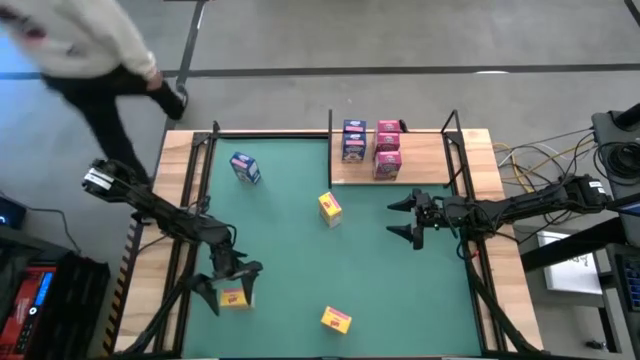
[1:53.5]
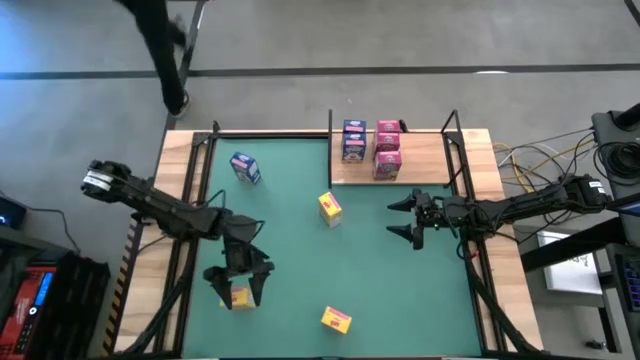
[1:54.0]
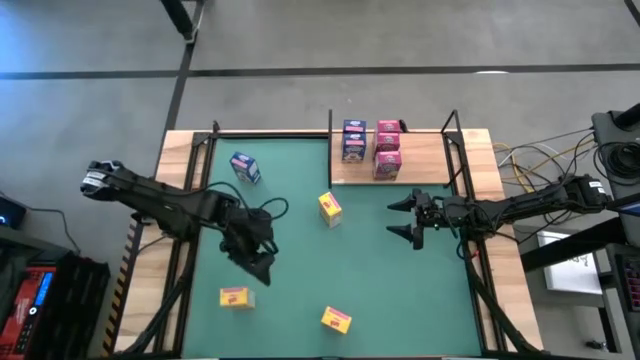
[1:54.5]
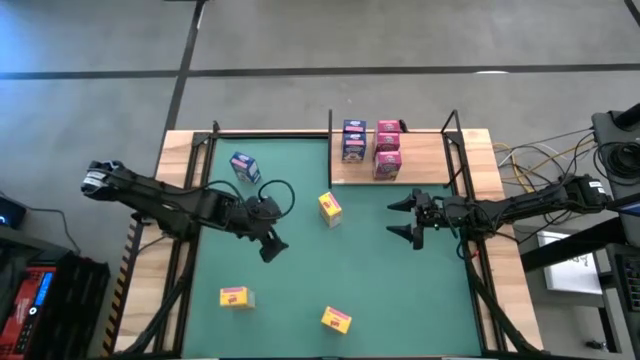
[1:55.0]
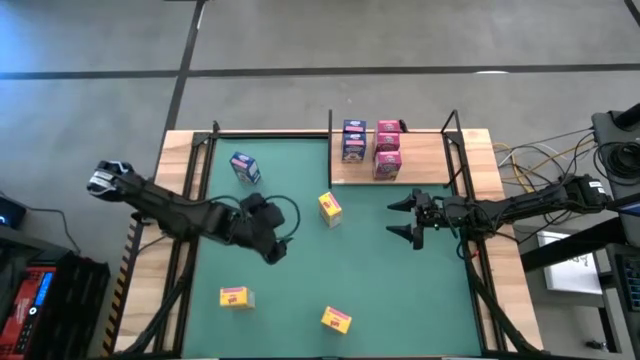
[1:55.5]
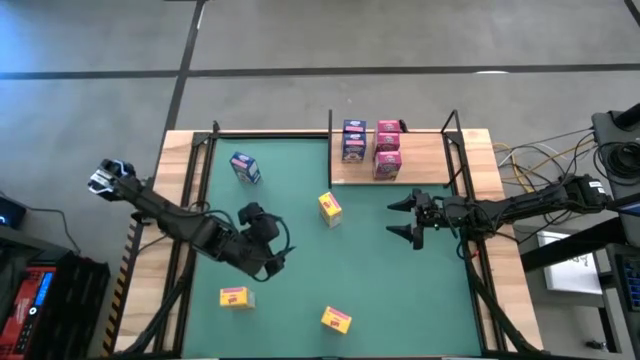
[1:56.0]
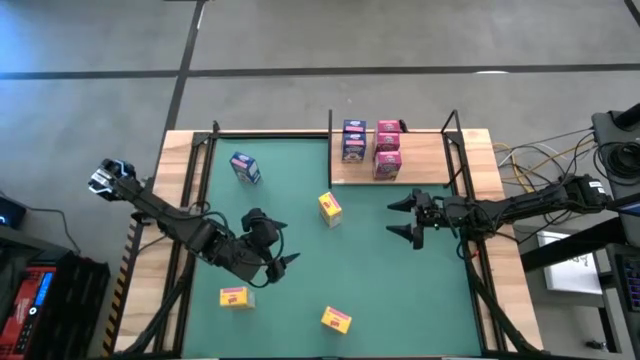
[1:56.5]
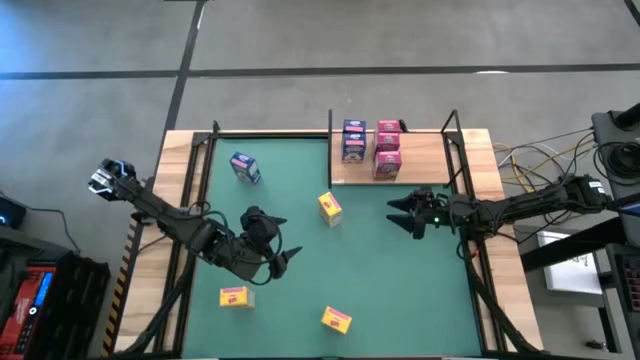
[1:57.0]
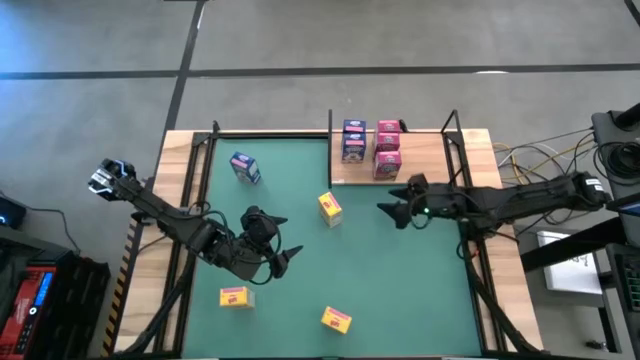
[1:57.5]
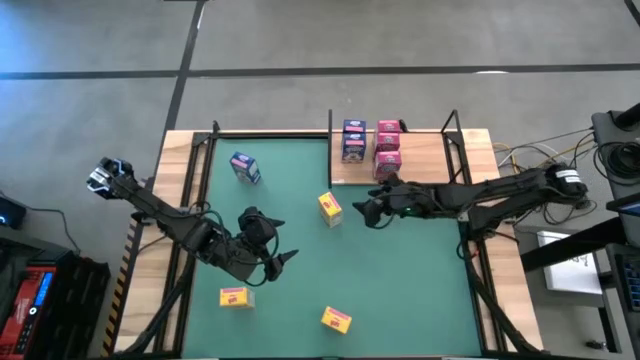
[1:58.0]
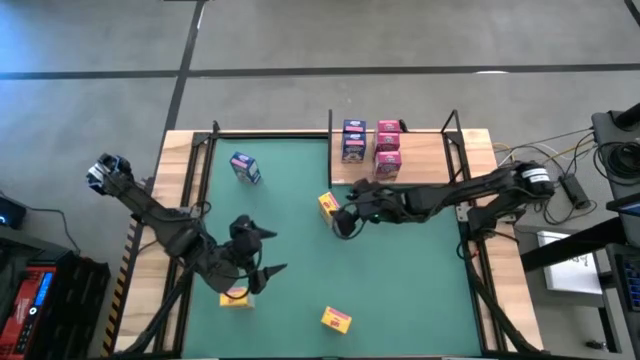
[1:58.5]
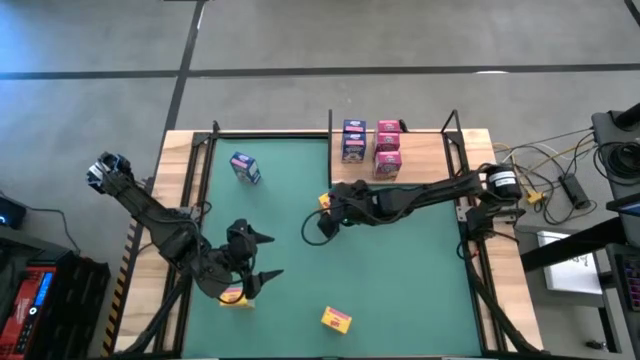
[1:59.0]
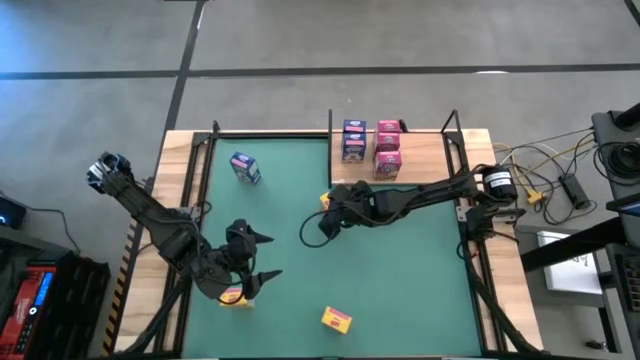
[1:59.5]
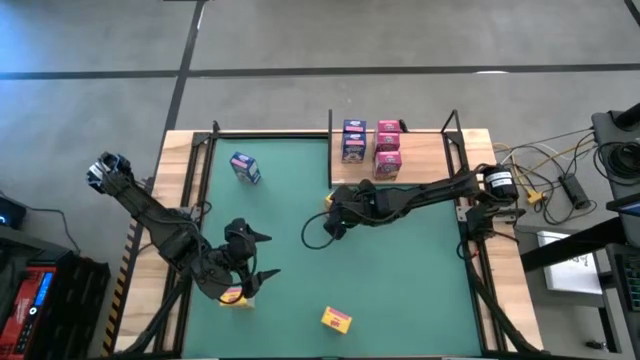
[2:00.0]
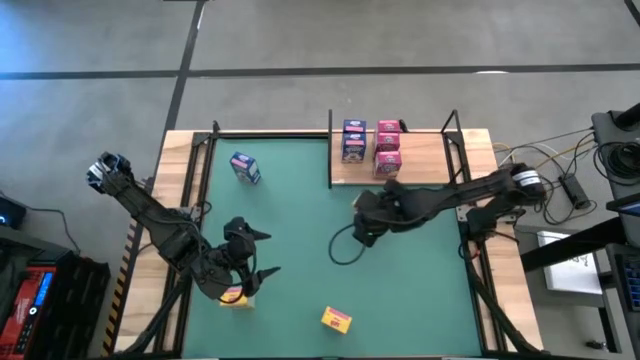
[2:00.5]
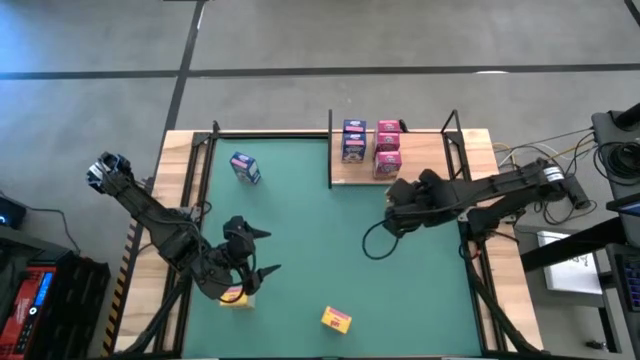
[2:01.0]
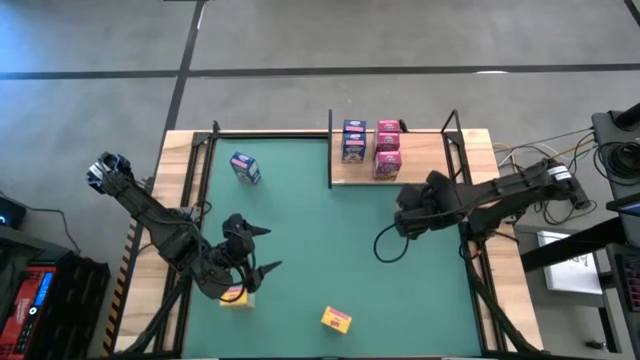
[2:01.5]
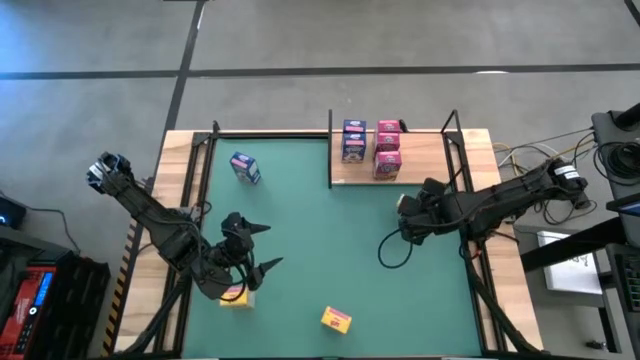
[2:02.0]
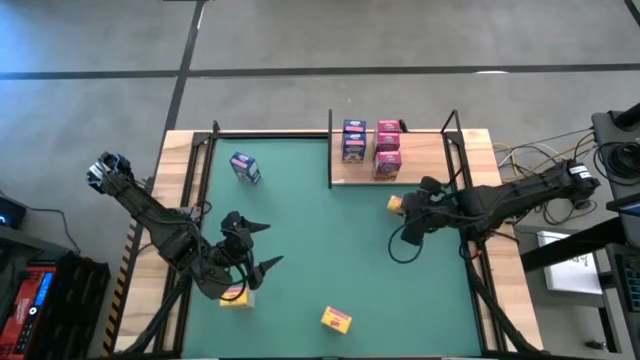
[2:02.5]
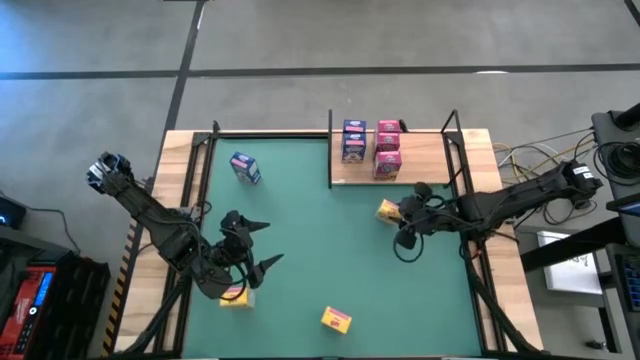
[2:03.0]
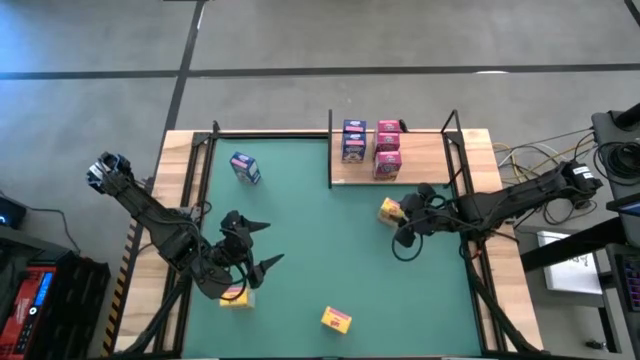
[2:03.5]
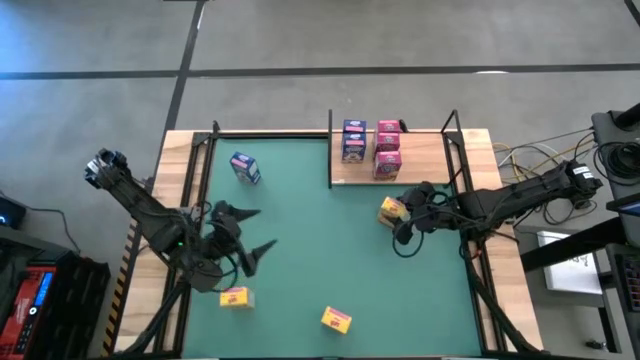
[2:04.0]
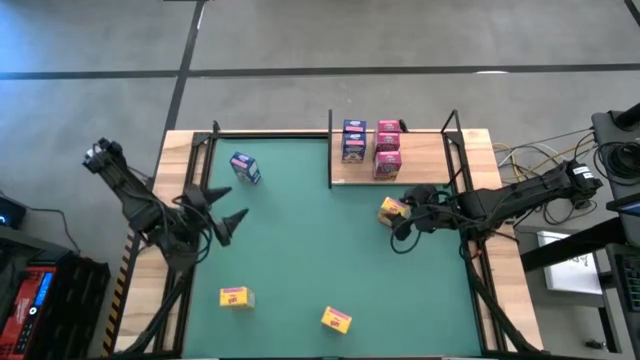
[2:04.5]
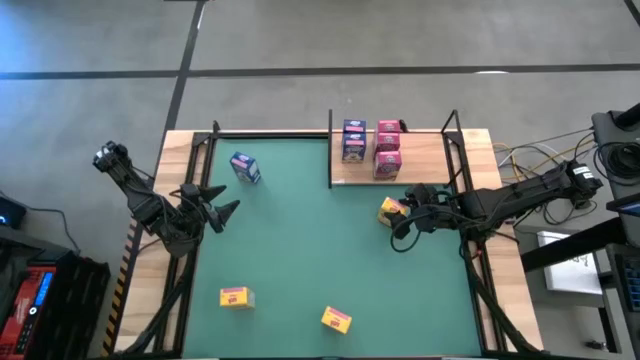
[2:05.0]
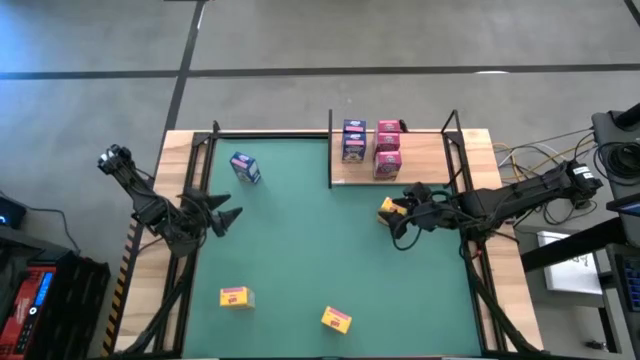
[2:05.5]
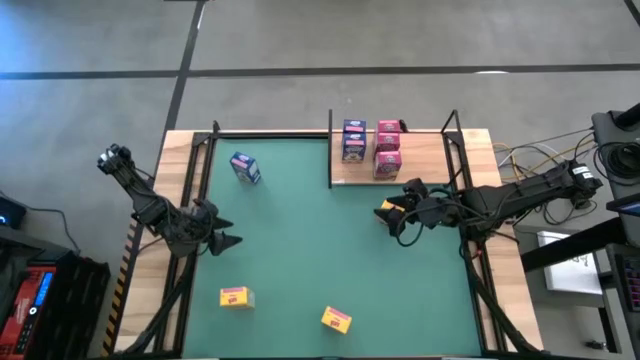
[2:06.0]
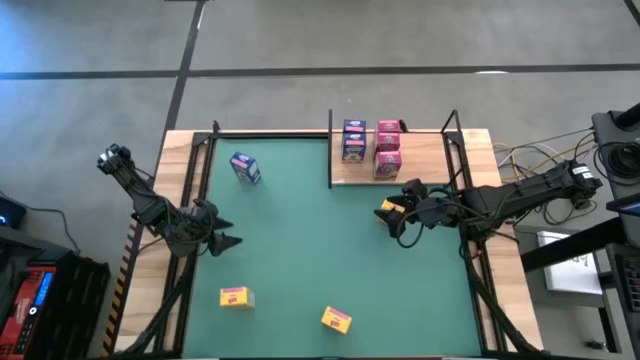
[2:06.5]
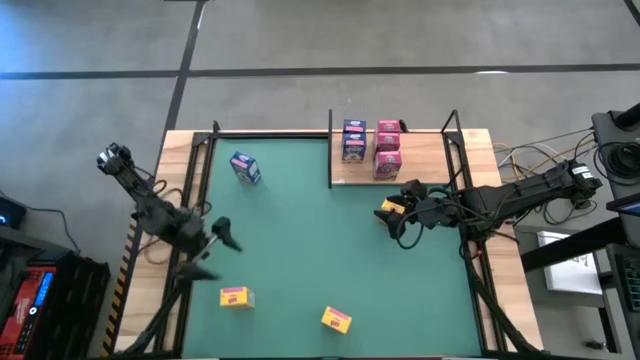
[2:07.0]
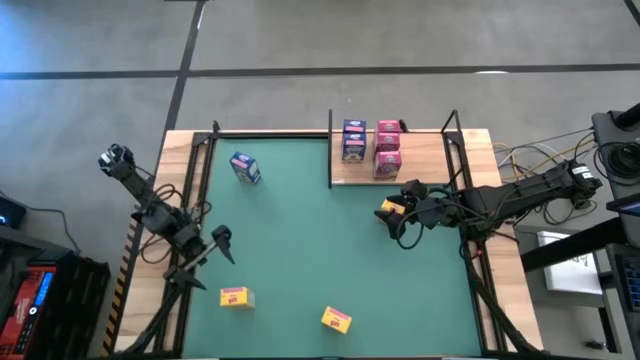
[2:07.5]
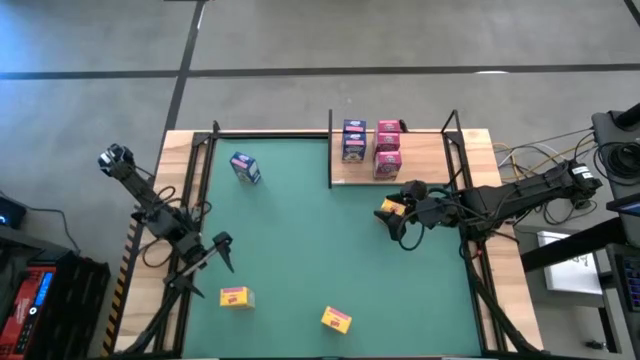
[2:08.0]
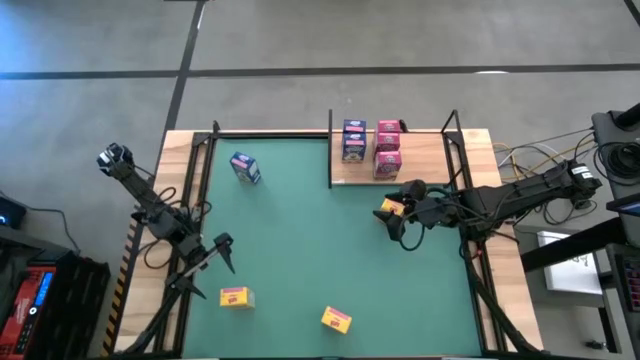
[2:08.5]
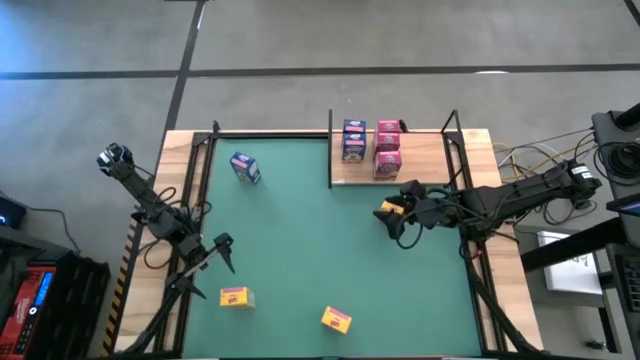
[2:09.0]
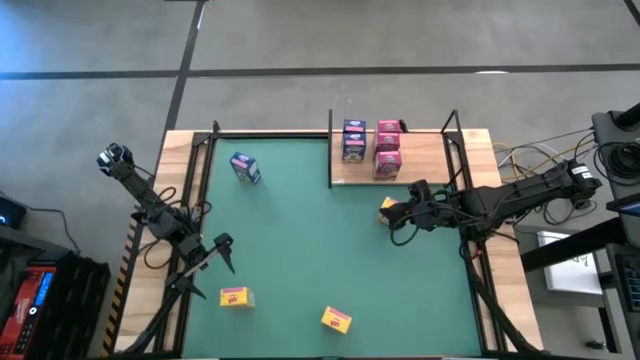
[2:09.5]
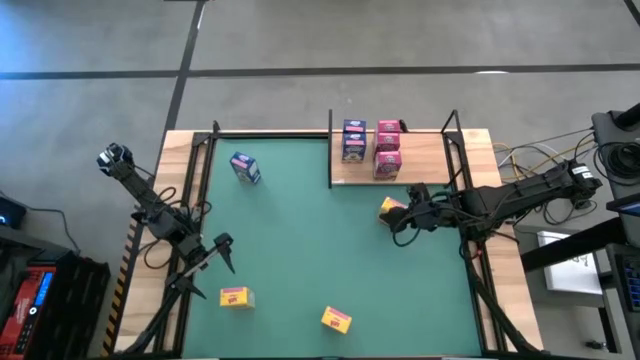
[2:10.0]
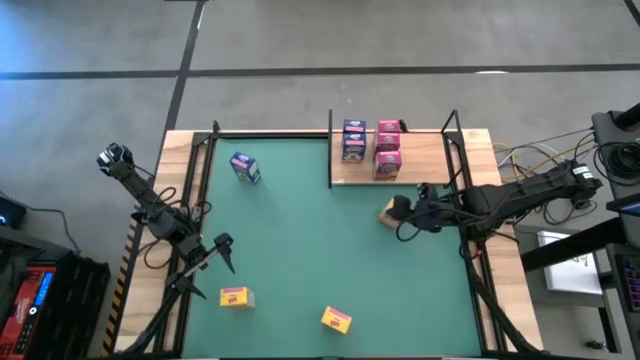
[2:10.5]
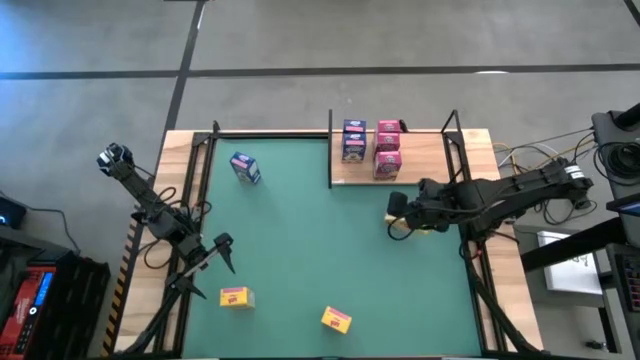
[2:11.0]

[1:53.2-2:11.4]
Task: Stack cereal on shelf
Put the right yellow cereal box onto the shelf

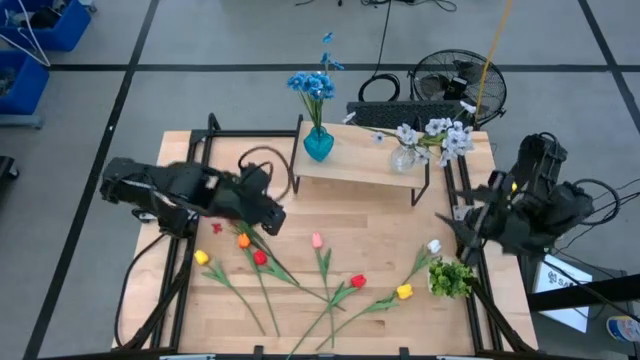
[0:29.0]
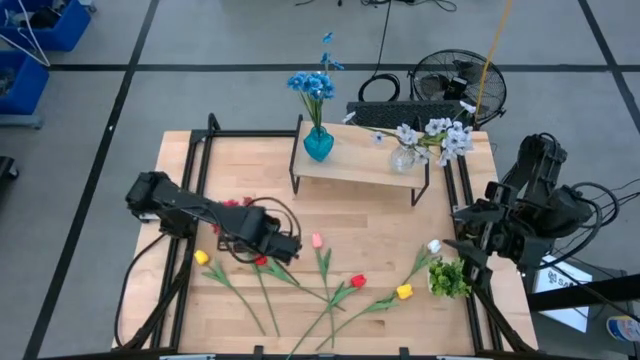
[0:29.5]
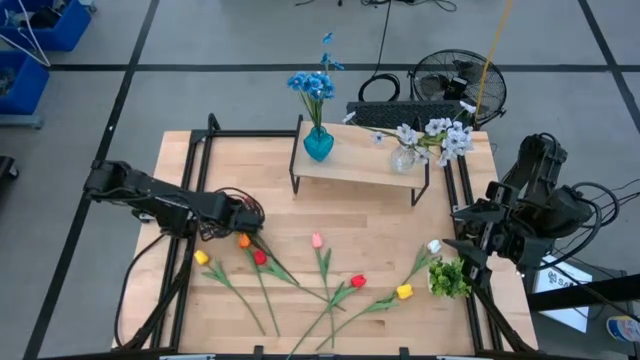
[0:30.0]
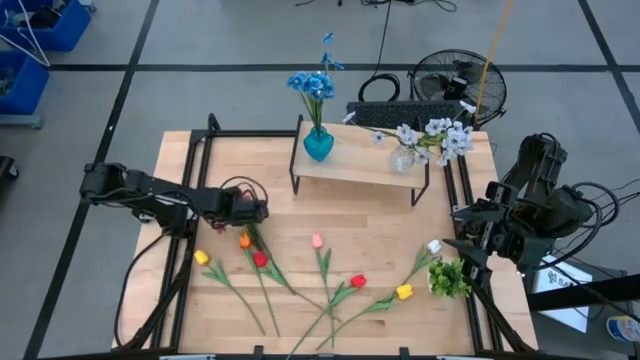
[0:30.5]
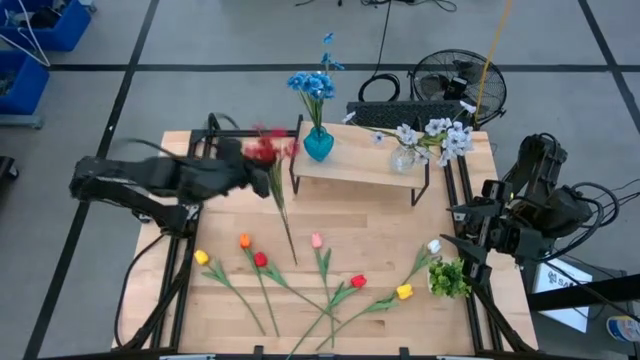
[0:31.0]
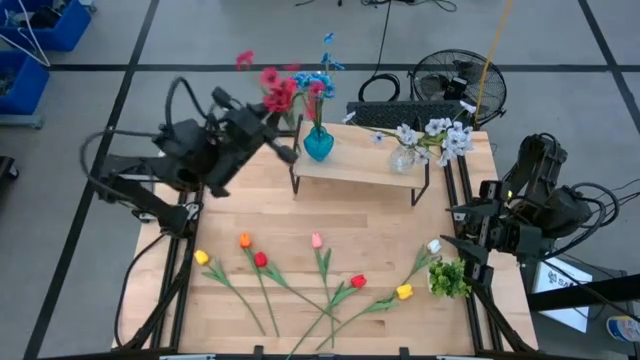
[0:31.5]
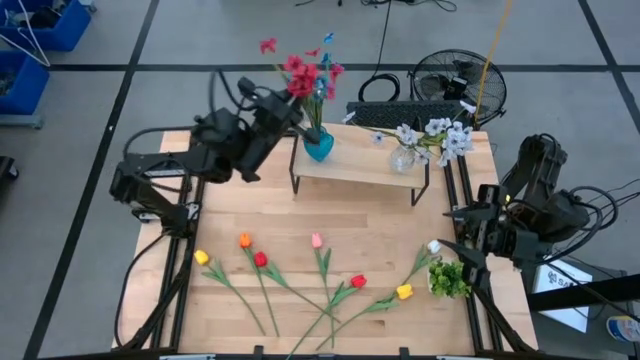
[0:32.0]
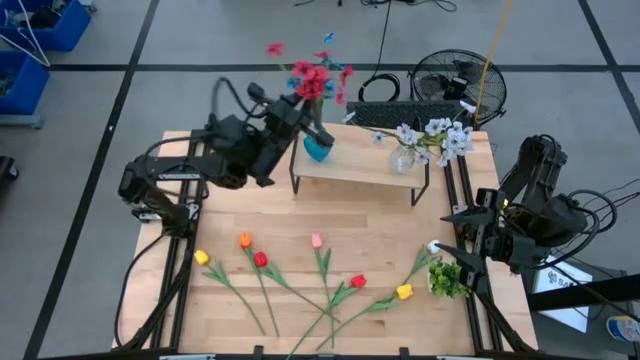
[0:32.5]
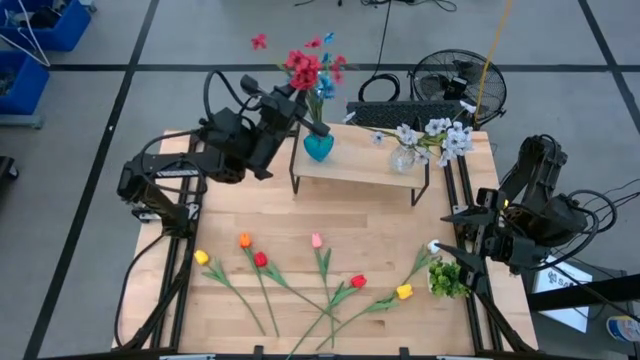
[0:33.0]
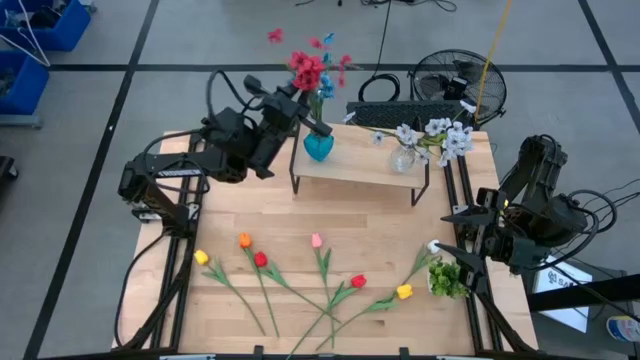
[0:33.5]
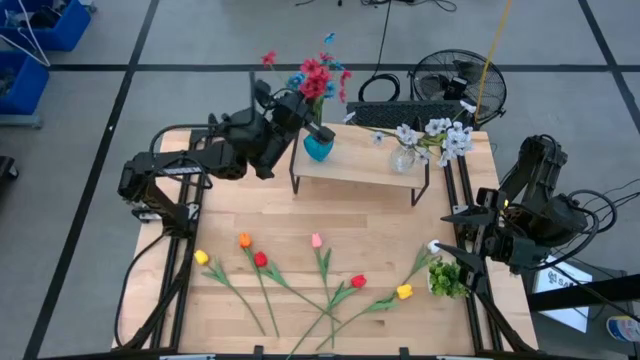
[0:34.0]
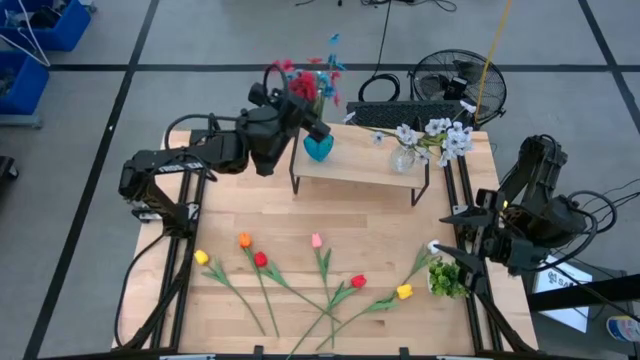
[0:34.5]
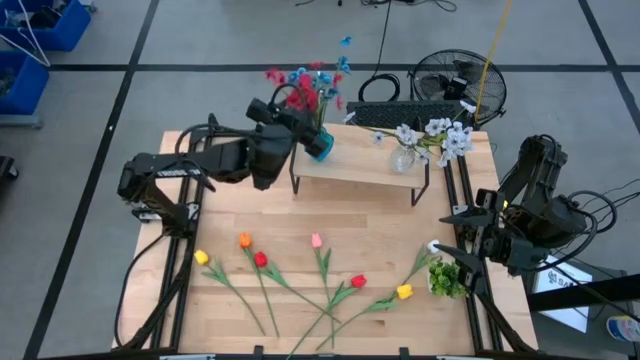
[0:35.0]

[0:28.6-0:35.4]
Task: Pick and place flowers into a vace then onto a shelf
Put the red flowers into the blue vase on the shelf
